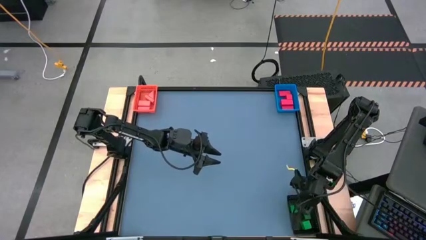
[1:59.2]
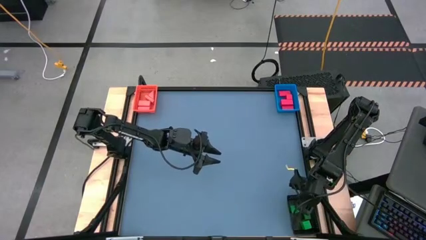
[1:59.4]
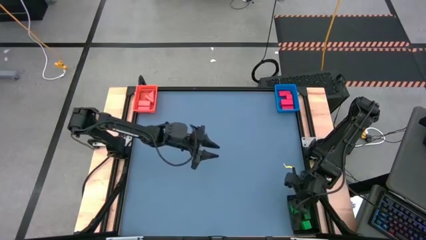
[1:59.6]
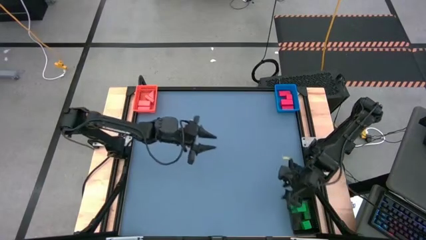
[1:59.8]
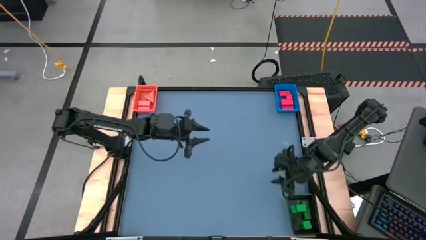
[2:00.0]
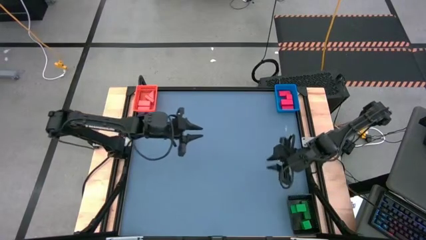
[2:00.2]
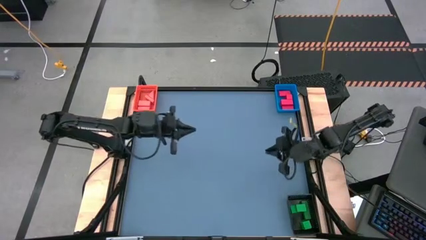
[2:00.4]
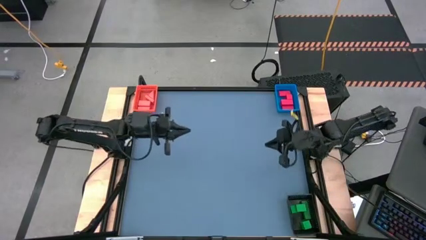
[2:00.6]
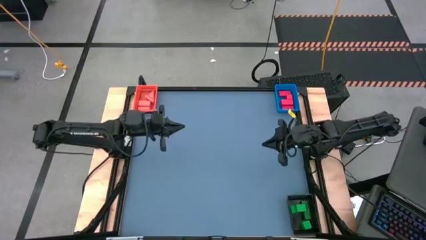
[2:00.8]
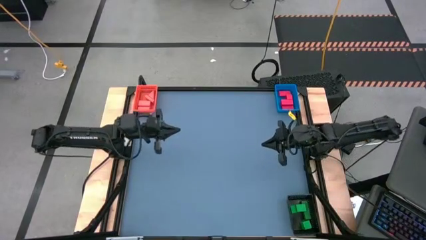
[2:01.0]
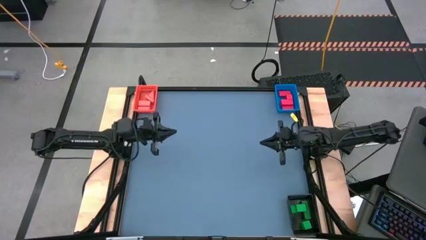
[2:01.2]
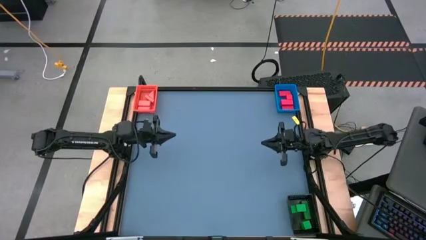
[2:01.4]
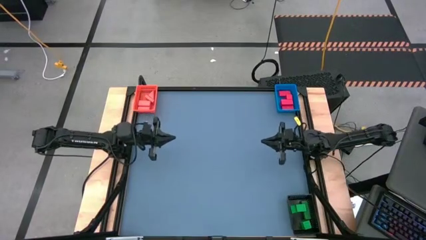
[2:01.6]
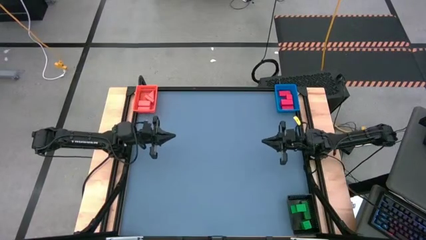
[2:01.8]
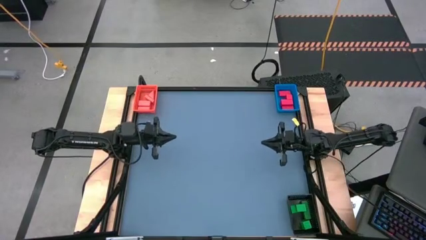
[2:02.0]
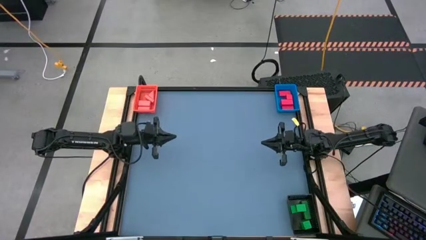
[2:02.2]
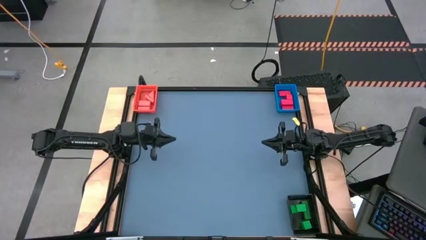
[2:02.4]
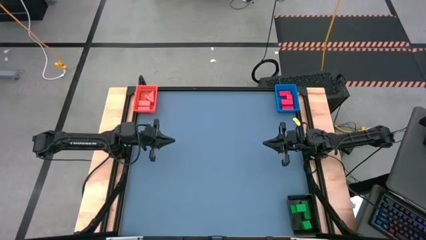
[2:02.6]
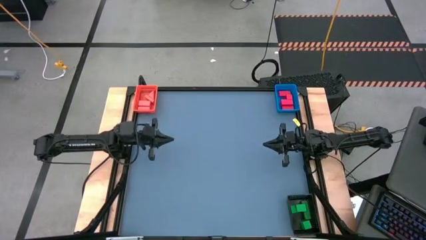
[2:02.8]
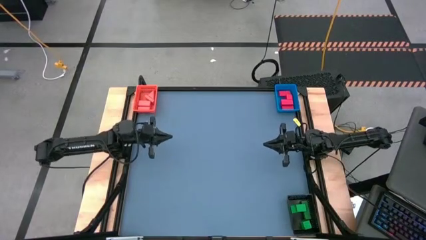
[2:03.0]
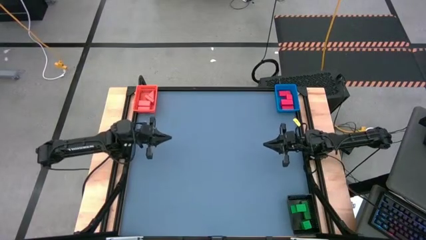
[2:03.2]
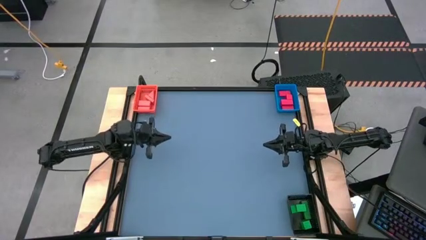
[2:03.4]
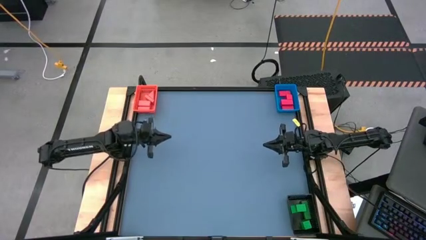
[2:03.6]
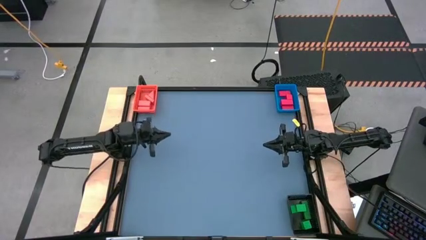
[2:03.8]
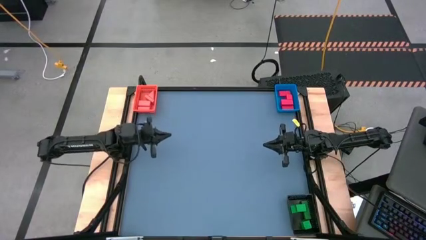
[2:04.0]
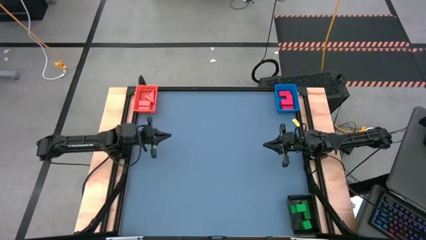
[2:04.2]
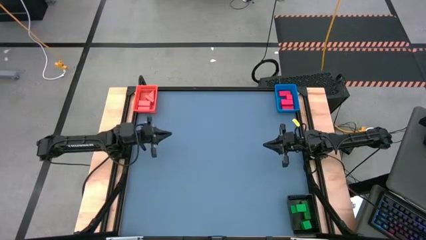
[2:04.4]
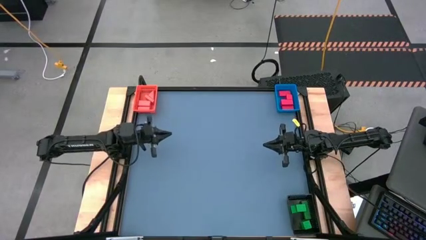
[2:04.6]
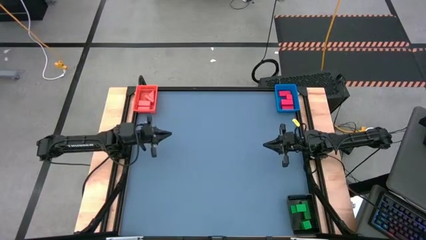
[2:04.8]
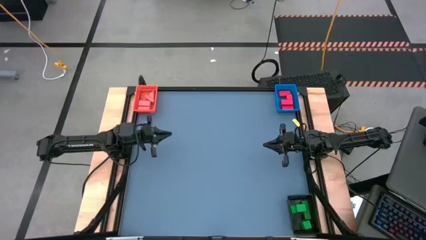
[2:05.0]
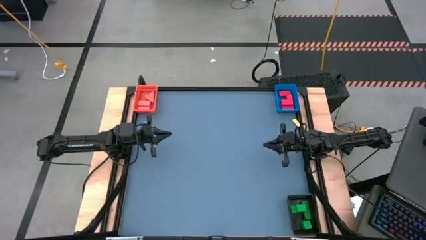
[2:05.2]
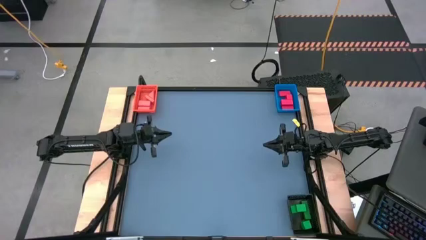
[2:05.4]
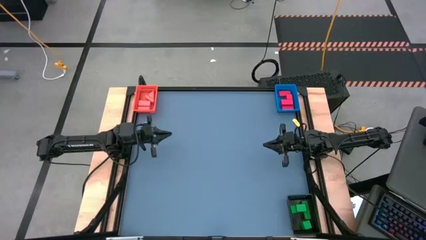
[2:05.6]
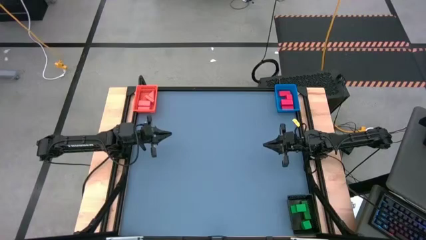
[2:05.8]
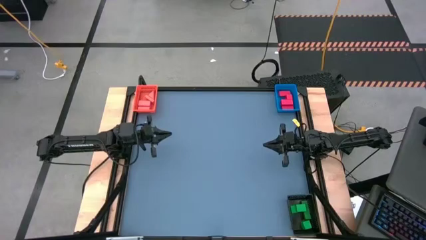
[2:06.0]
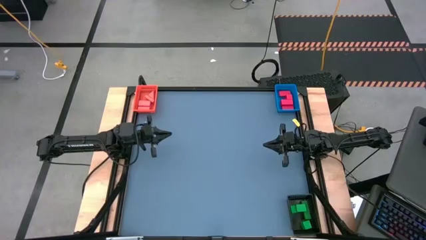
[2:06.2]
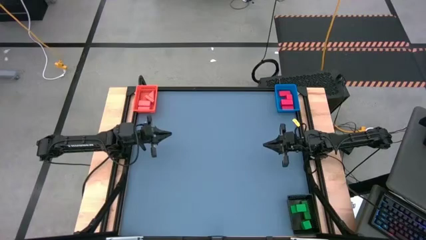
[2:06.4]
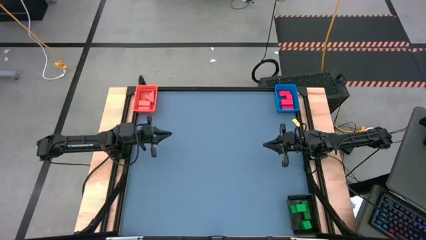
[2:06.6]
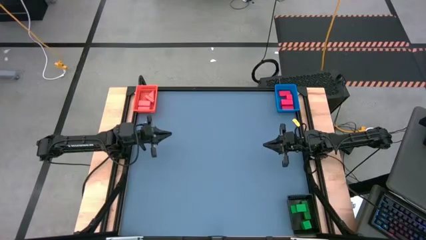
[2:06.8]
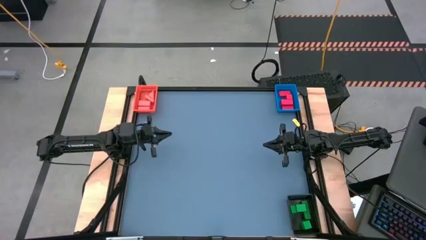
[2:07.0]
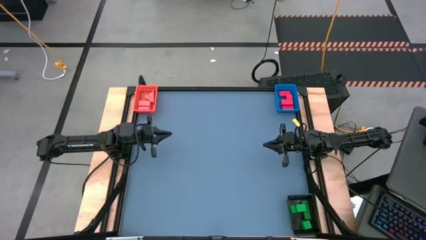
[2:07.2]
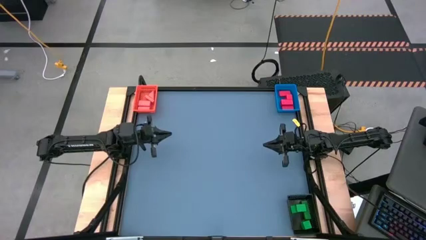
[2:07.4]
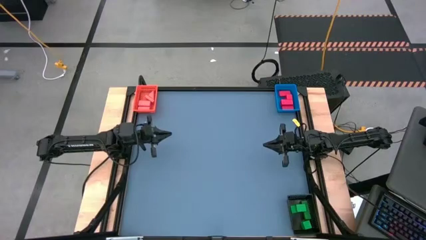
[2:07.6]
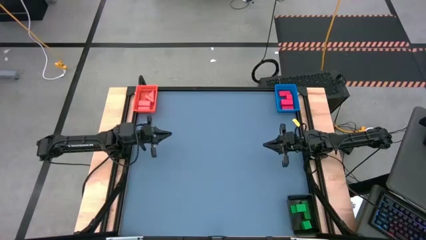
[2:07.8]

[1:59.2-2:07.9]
Task: Sort & place blocks by color
Return to Home Position

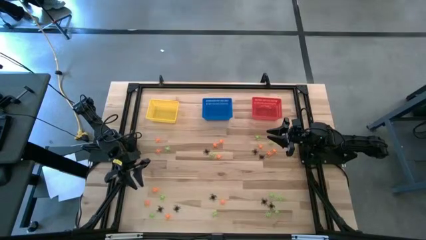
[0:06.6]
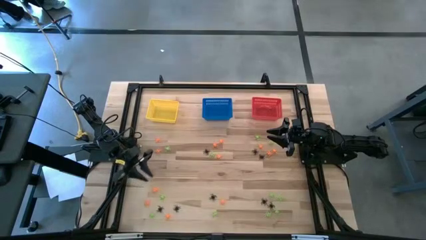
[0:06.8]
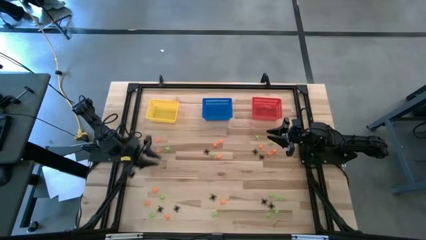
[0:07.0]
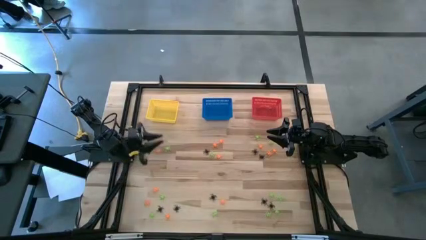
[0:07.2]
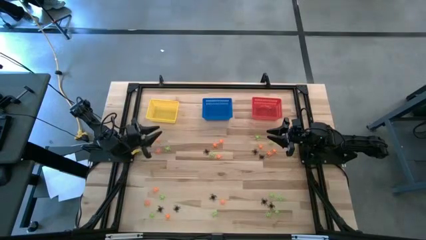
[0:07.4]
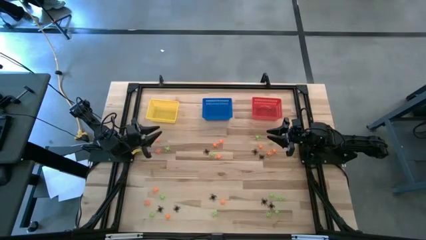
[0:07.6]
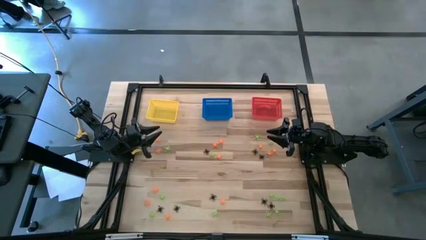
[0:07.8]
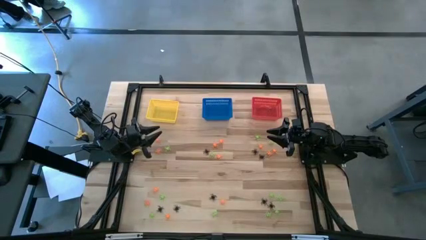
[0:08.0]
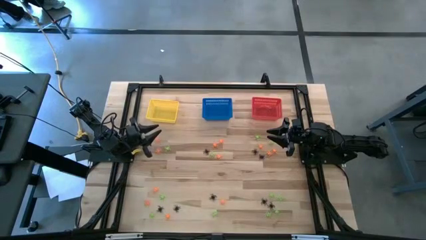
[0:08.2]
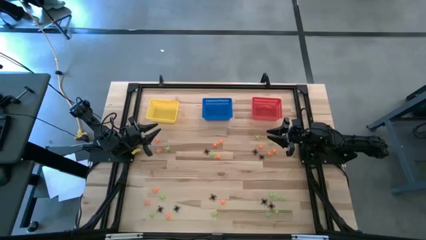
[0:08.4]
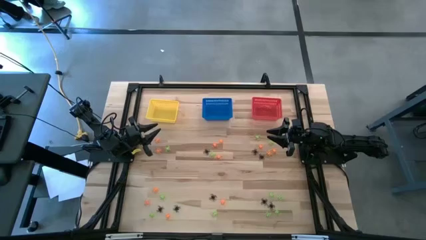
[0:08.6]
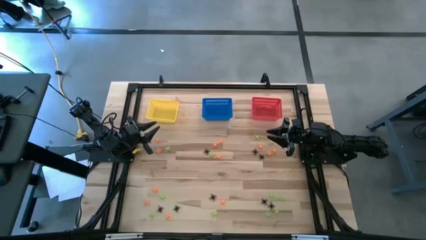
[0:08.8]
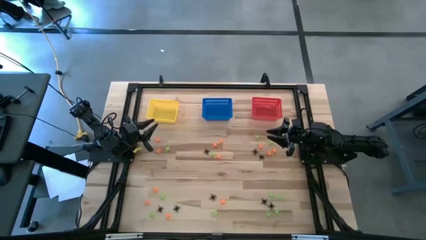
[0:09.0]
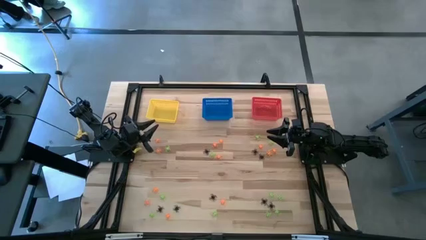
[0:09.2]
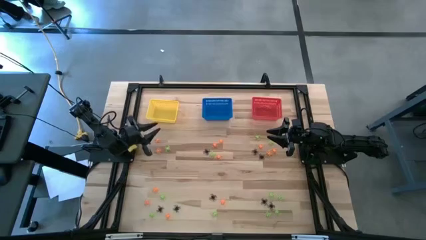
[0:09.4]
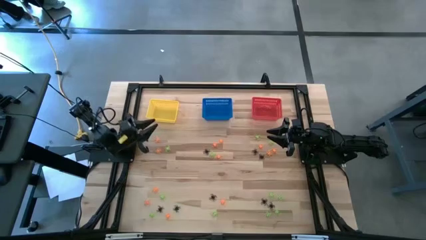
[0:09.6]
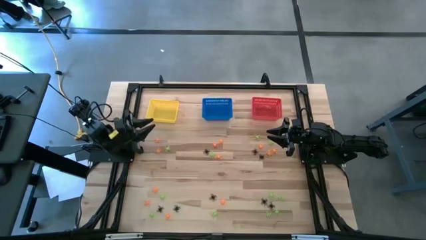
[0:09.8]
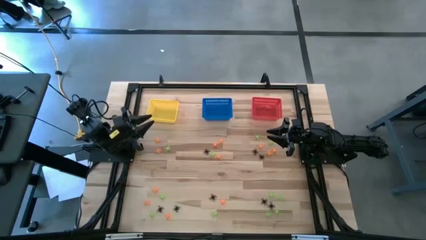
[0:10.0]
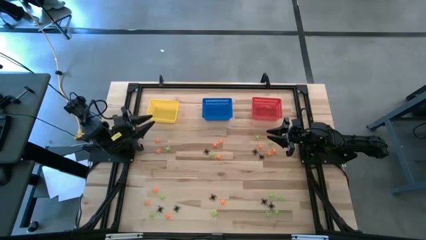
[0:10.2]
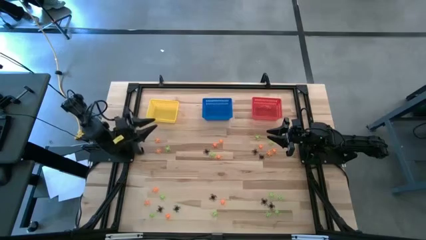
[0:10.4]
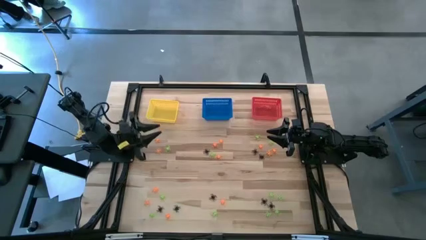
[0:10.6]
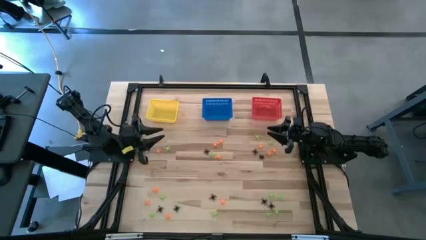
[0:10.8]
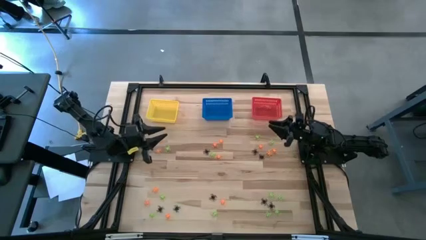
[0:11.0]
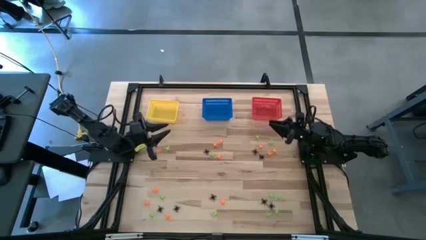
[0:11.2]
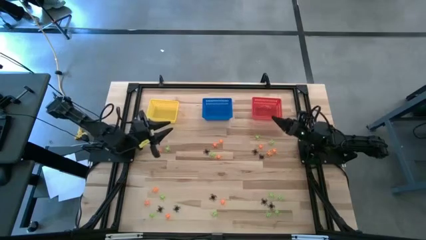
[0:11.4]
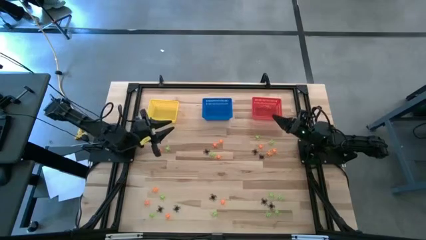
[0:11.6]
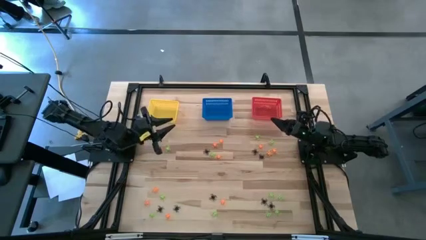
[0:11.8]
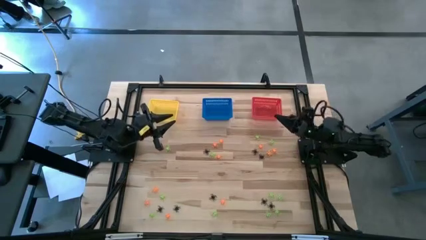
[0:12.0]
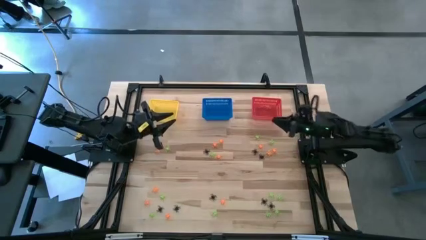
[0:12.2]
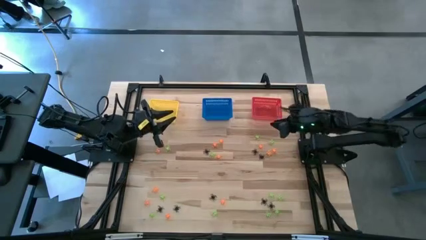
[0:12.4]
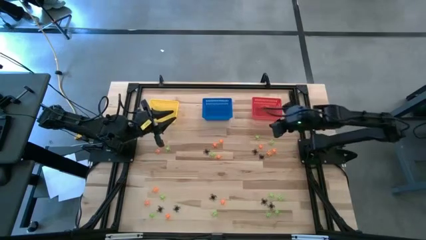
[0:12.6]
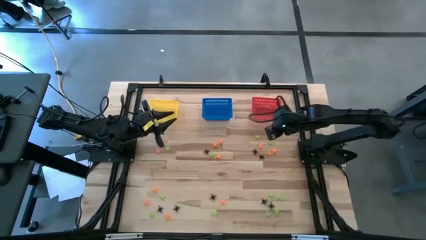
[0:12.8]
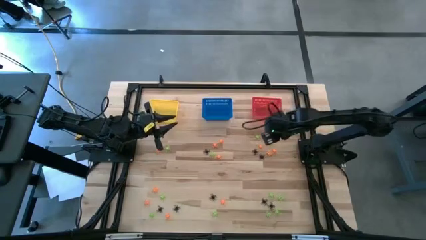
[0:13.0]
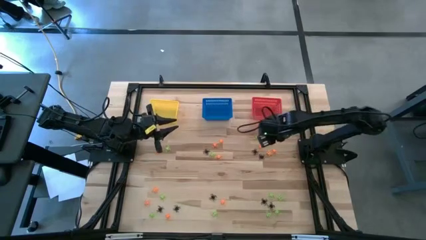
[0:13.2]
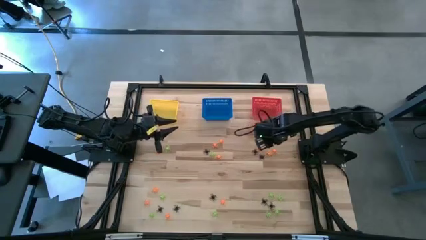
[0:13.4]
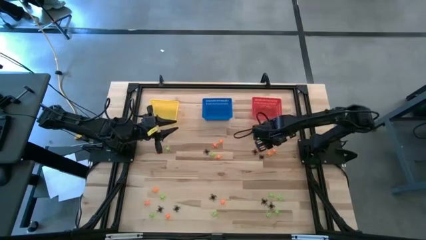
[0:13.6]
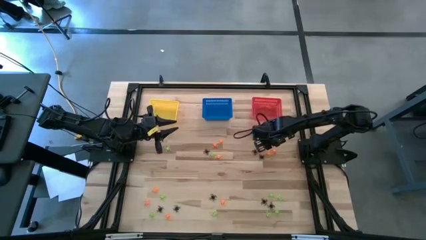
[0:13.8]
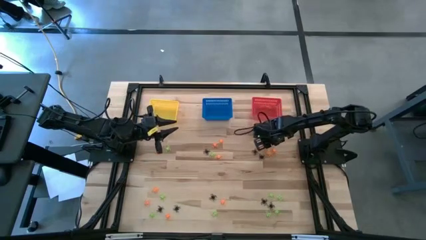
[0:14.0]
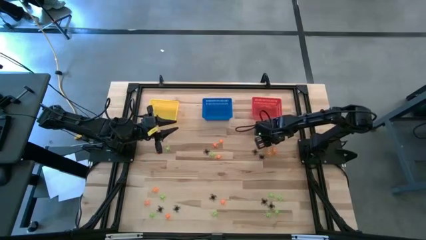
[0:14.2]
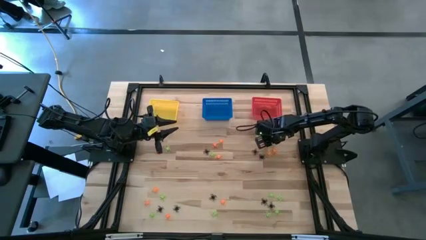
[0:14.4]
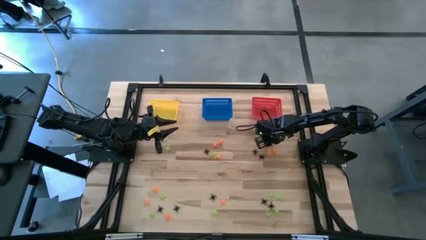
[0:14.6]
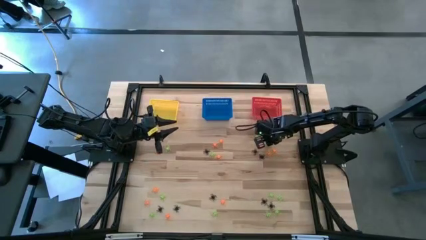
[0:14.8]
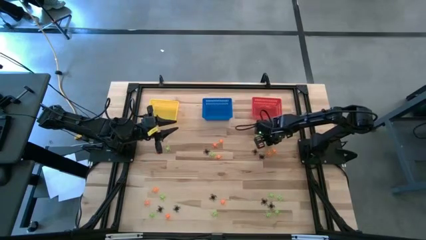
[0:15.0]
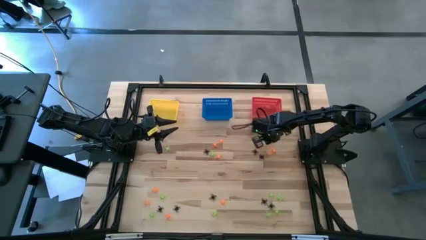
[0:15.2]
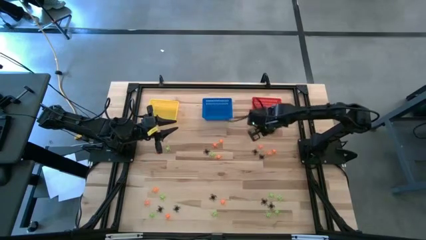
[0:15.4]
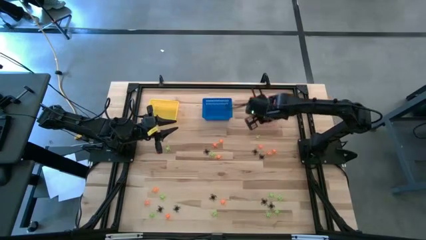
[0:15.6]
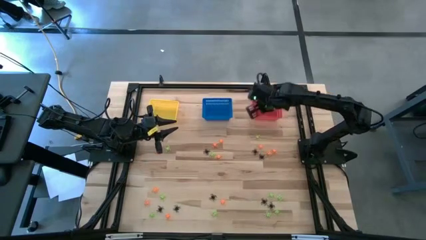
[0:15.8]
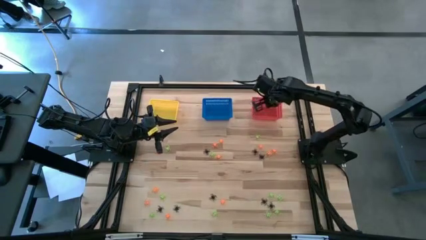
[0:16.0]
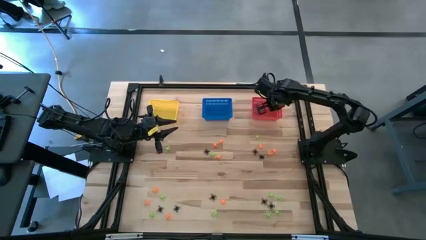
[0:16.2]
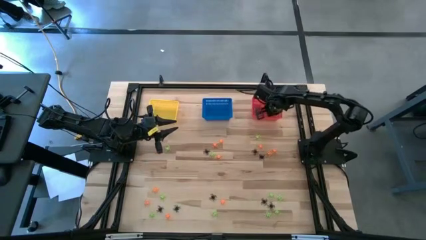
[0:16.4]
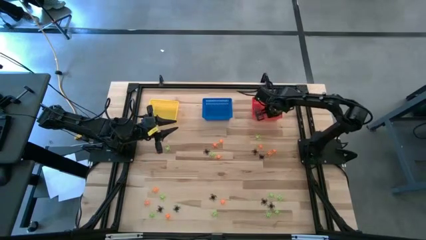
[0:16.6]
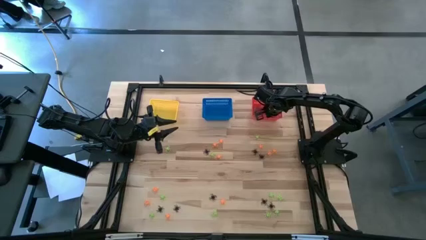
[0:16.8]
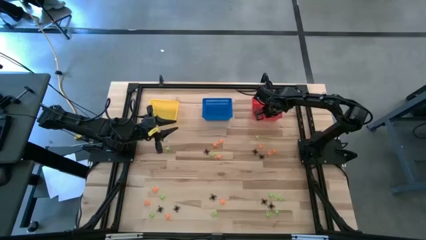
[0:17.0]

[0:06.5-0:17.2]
Task: Sort Halloween decoration
Put the green spider toy into the red basket
